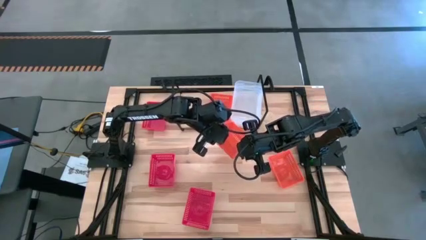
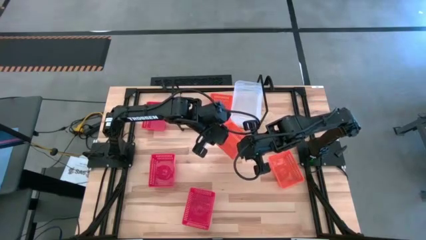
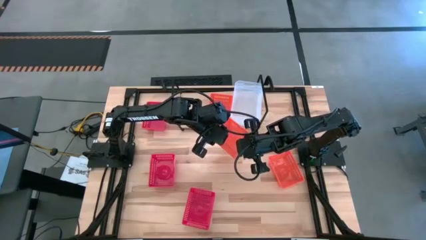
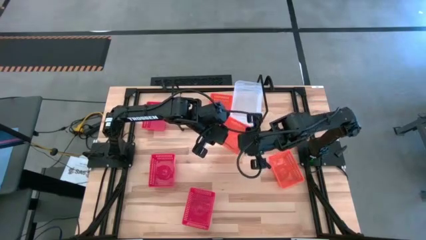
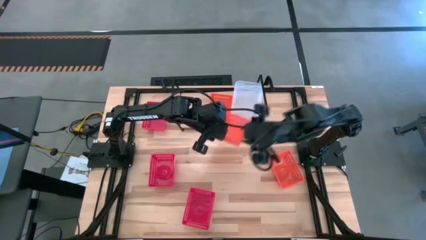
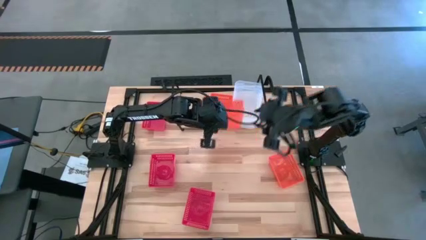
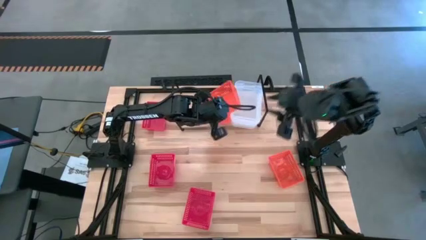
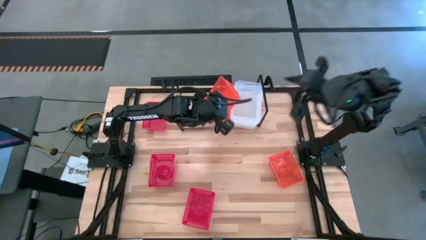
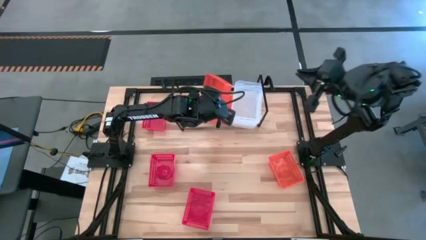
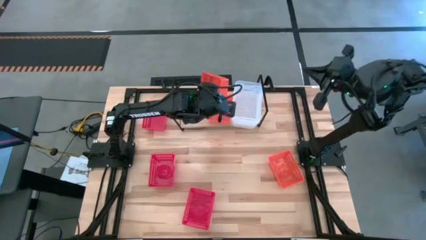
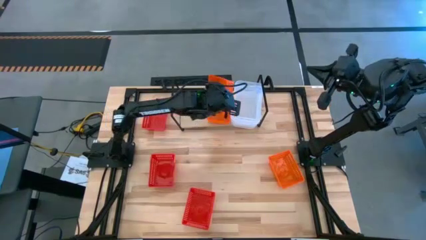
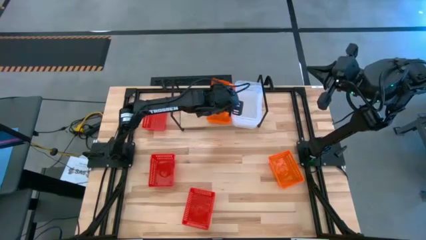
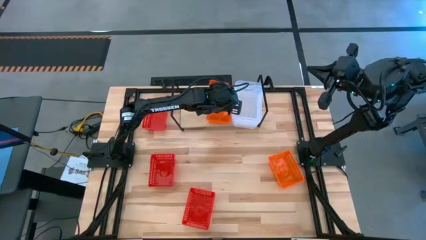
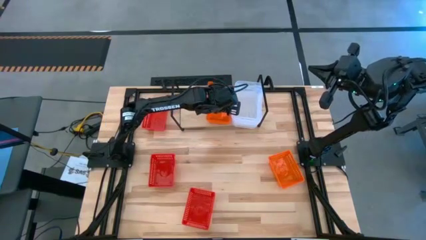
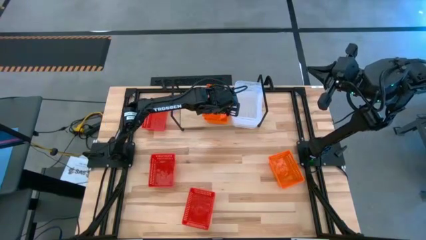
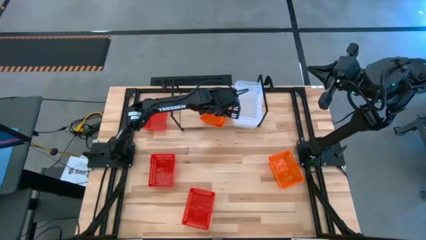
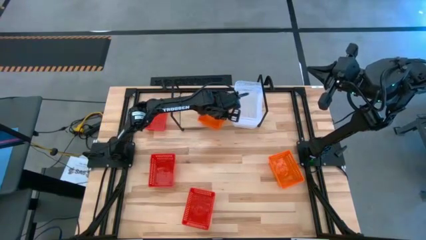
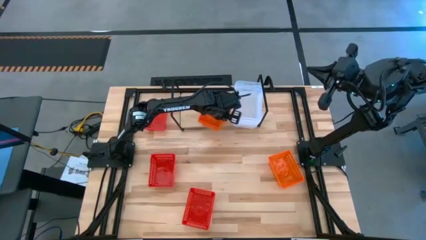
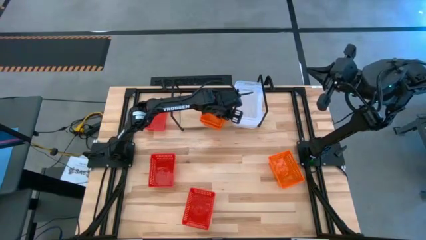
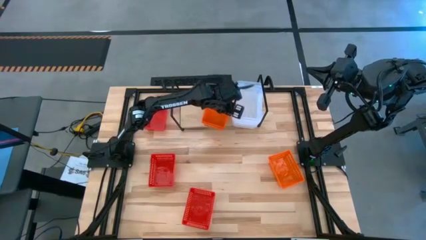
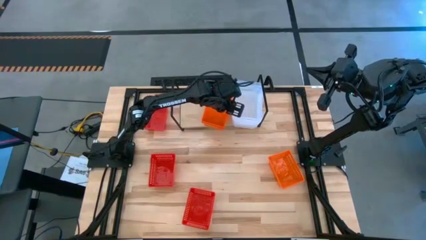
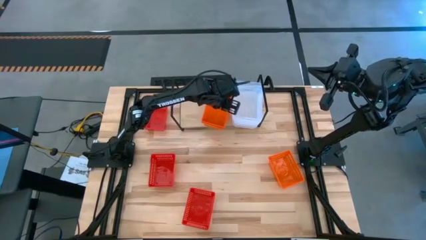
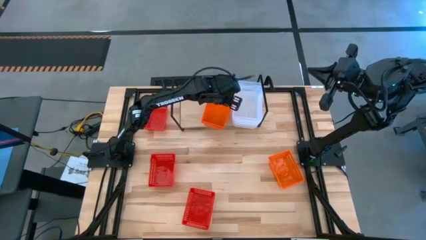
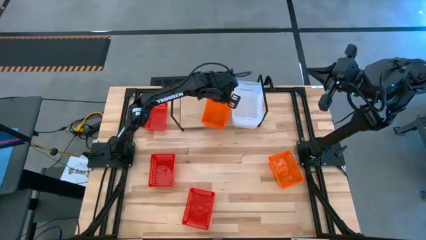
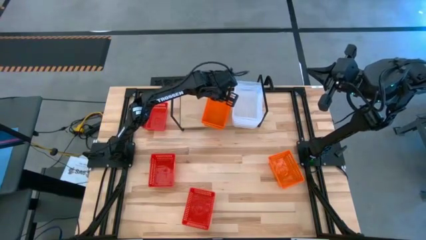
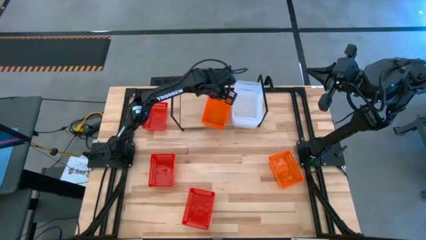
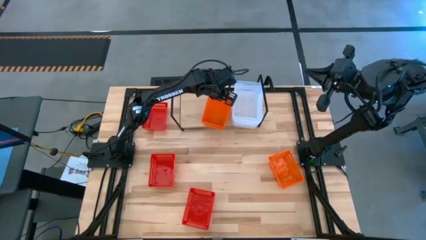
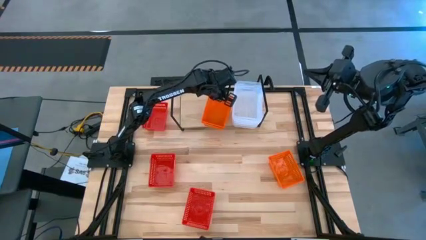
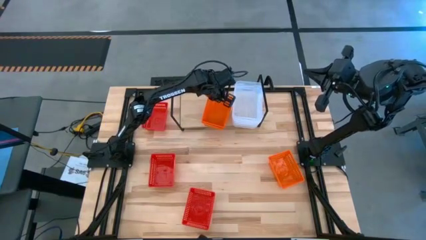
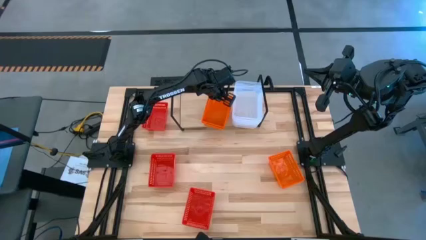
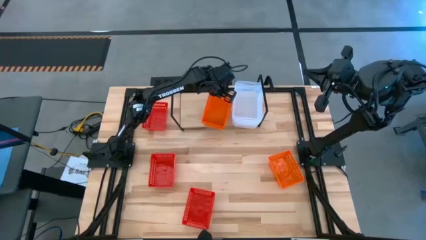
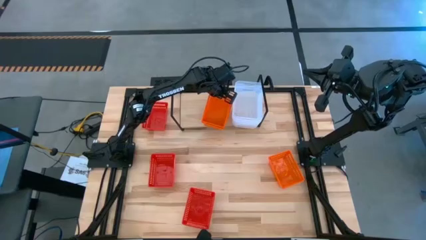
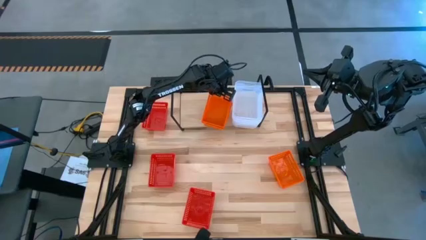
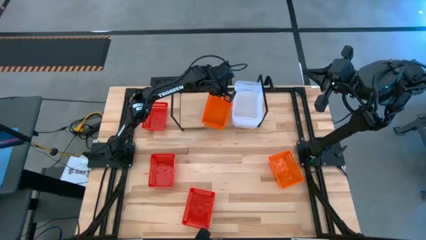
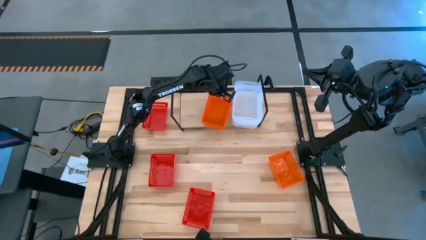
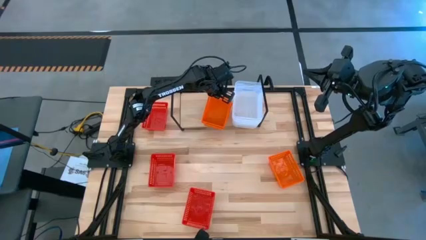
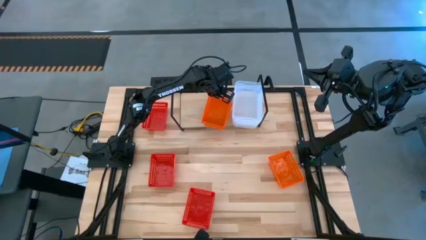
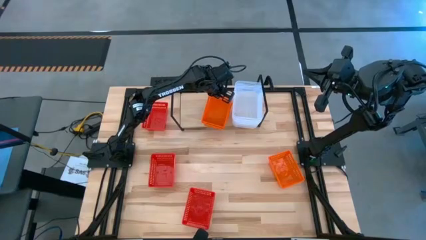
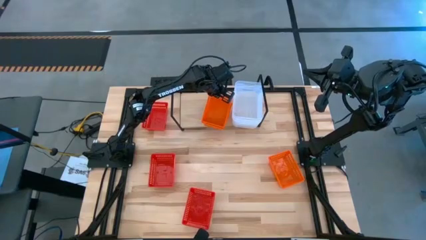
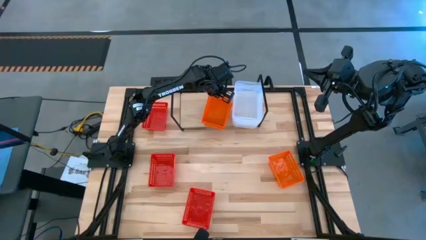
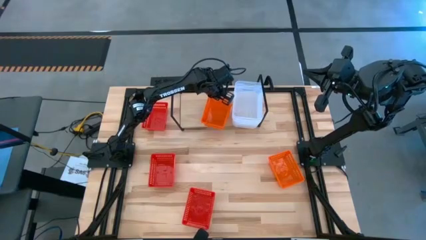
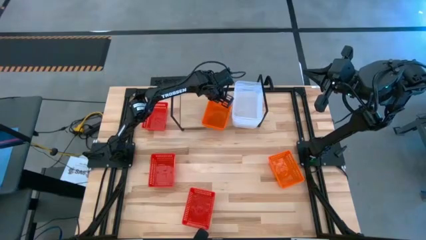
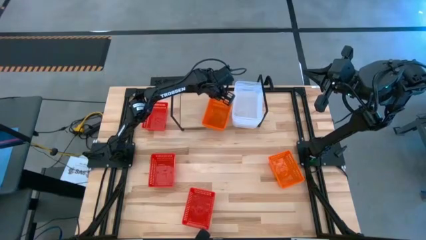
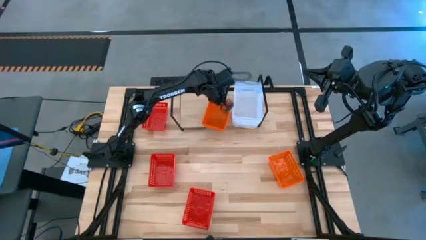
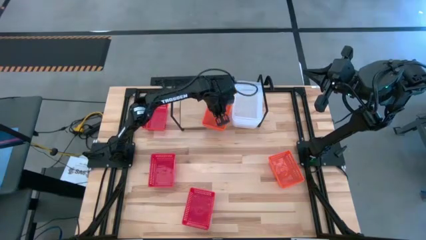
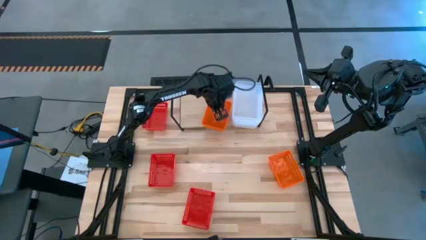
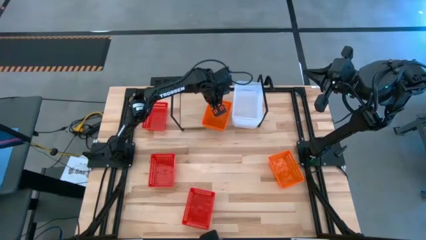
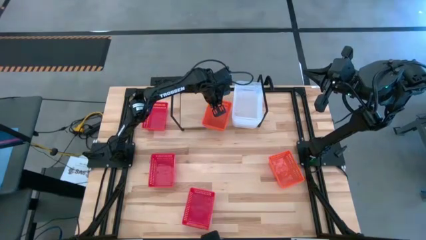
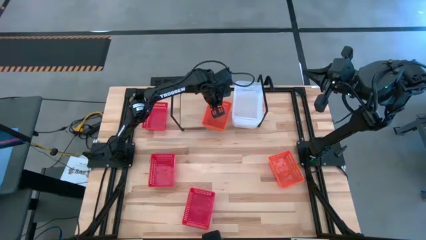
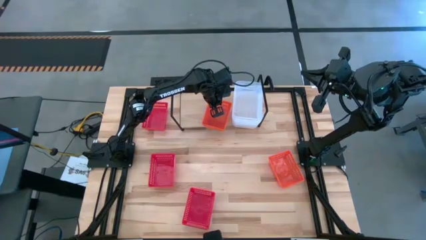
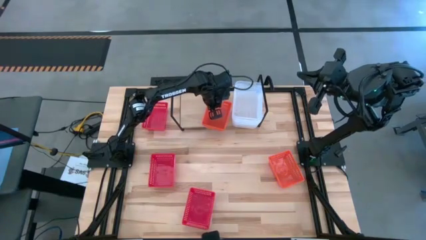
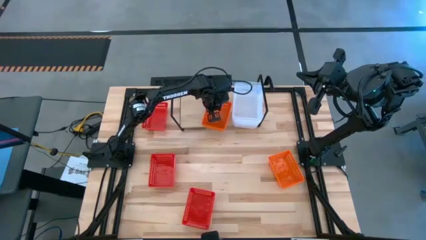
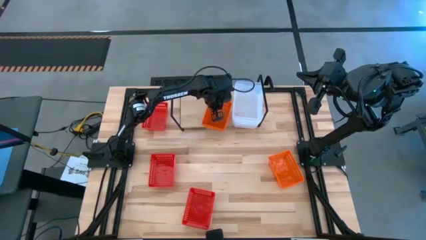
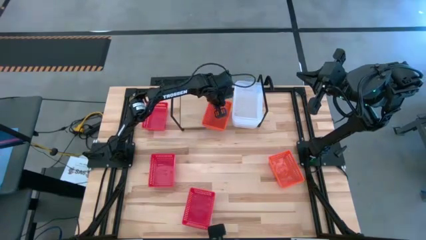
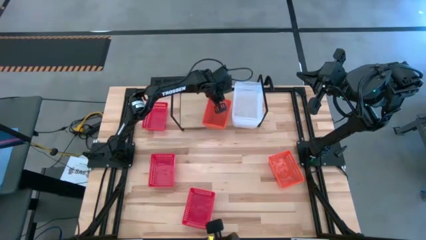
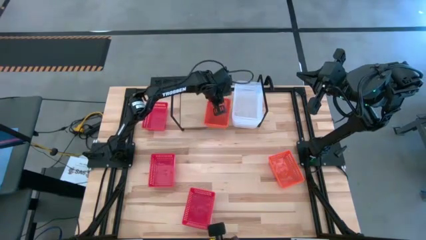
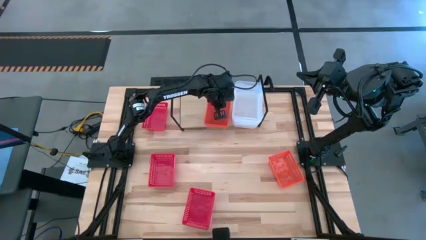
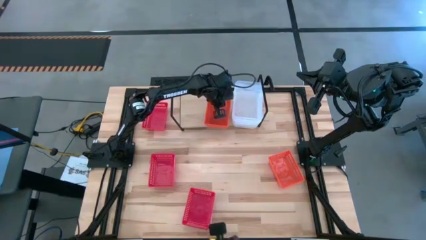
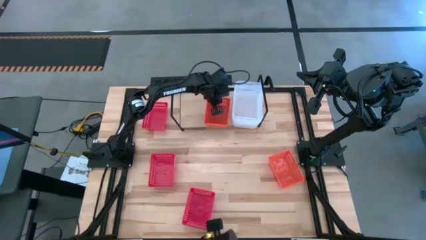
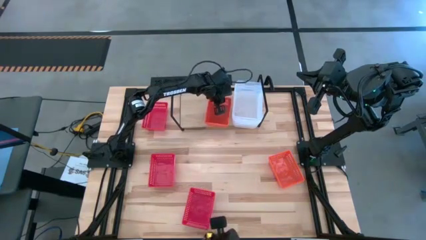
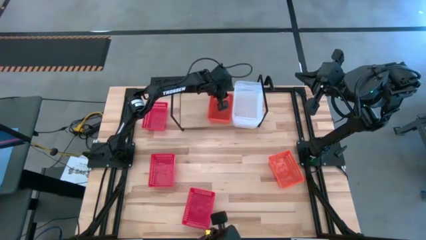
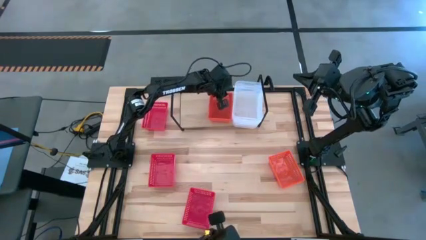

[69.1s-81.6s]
Task: Stack baskets on shelf by color
Stack the top orange bin on top of the orange bin on the shelf

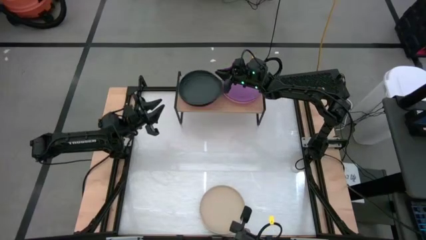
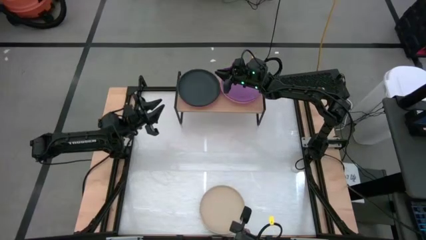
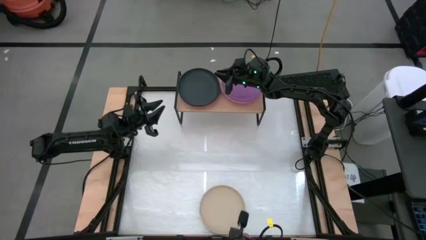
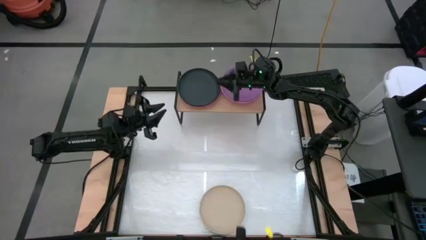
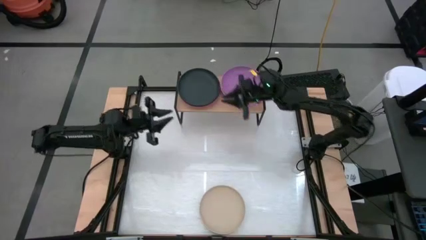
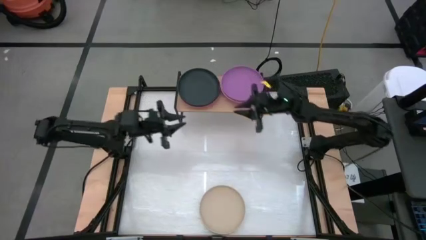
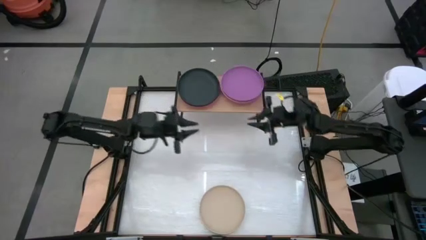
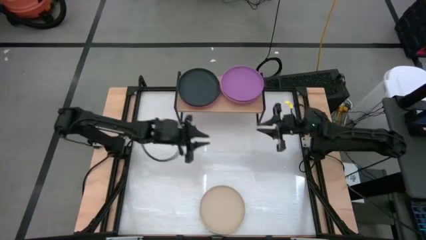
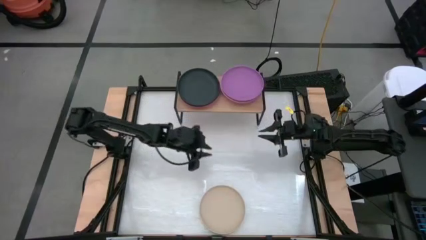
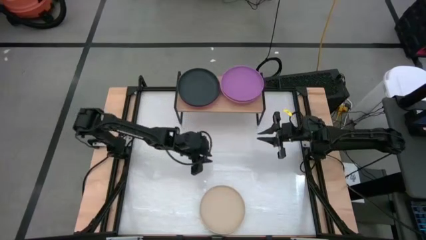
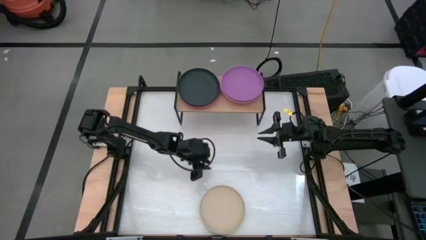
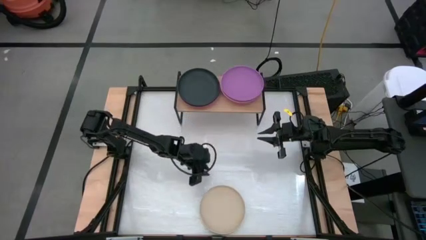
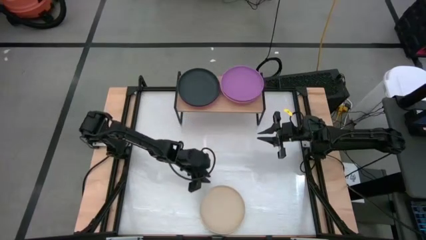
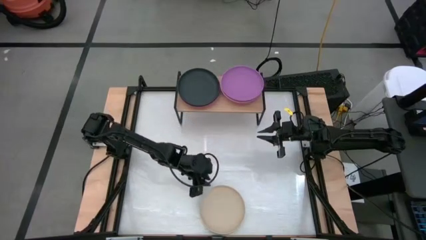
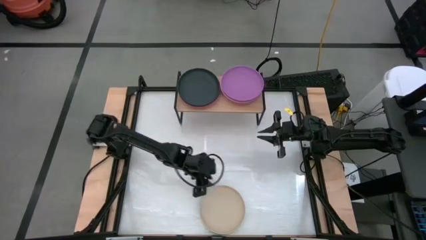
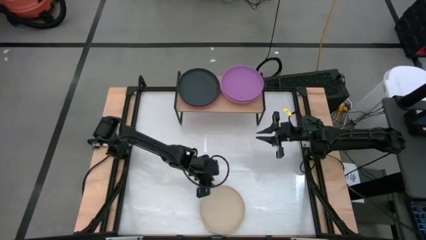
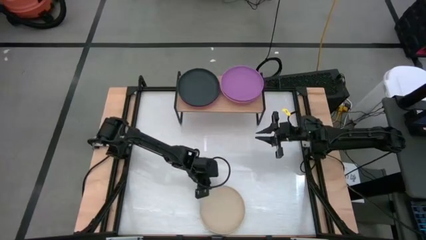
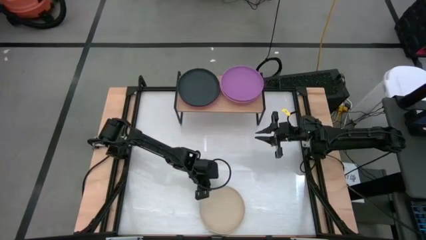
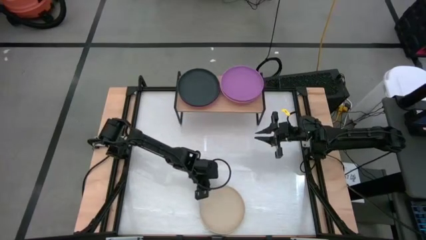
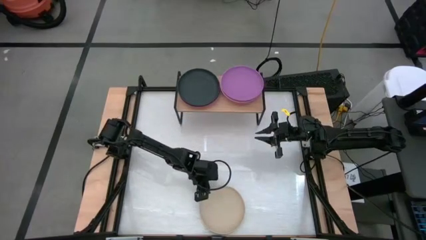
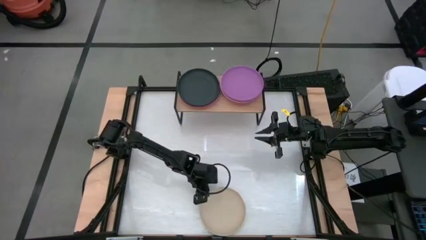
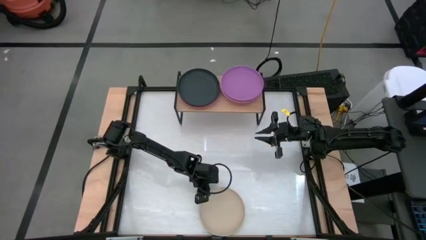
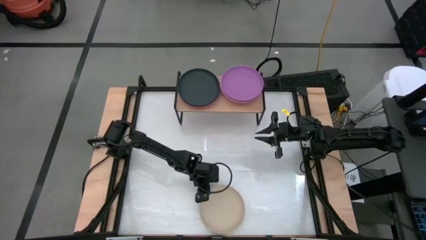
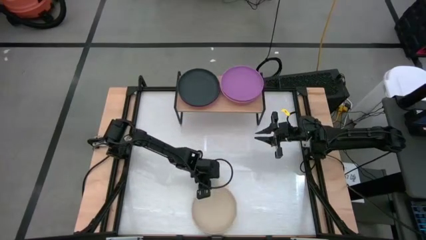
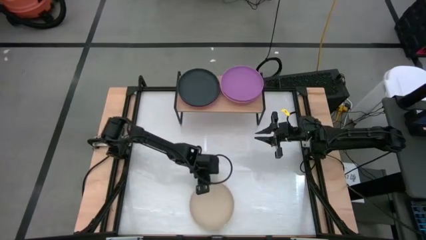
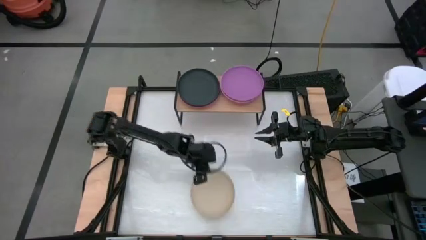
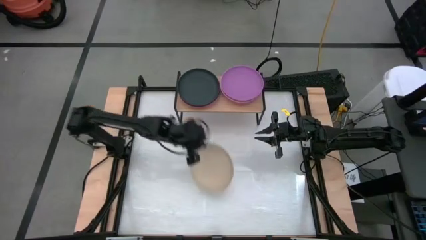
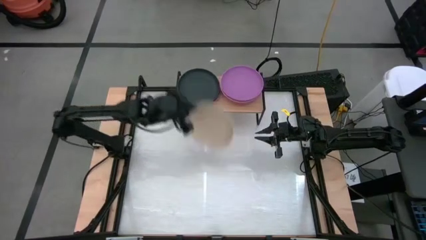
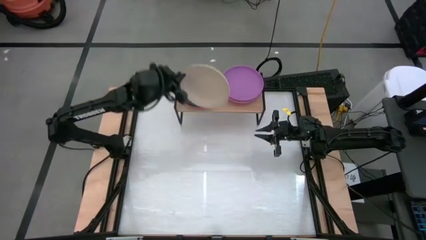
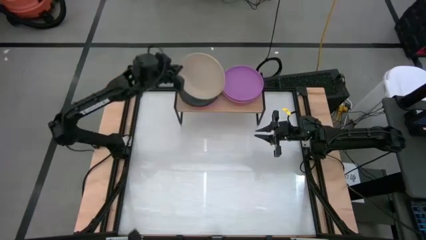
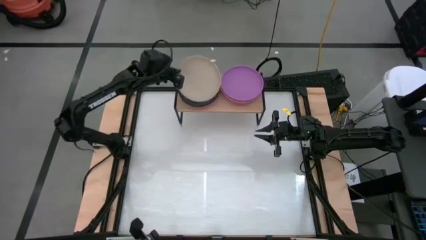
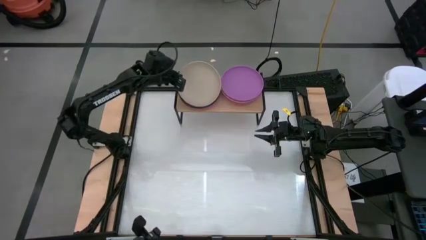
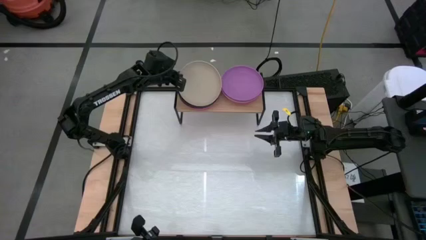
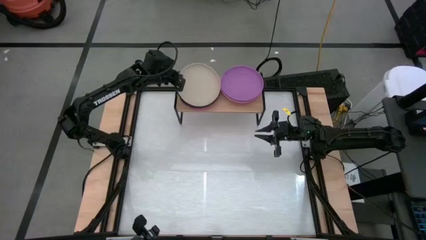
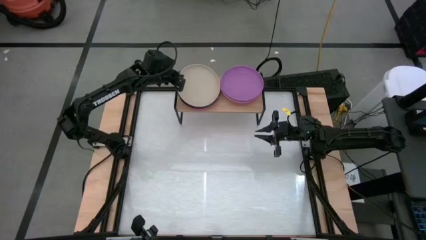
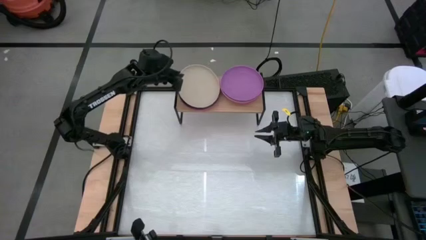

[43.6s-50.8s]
Task: Place and stack plates onto a shelf
Stack the white plate on top of the black plate on the shelf
